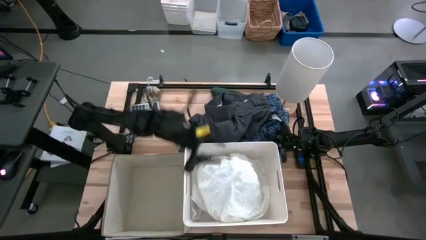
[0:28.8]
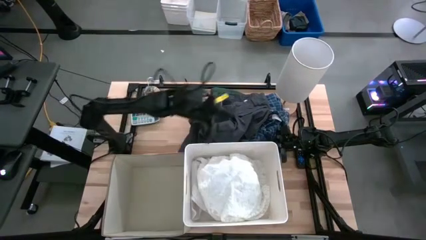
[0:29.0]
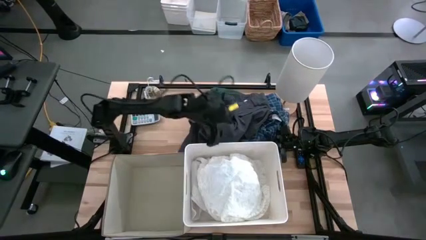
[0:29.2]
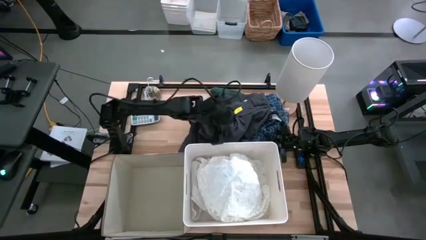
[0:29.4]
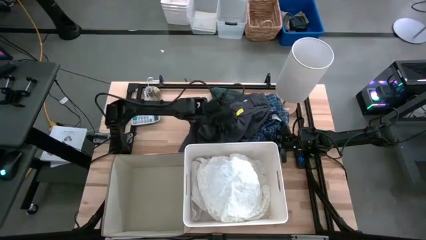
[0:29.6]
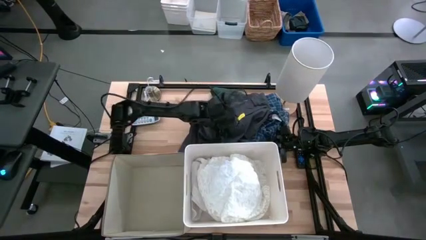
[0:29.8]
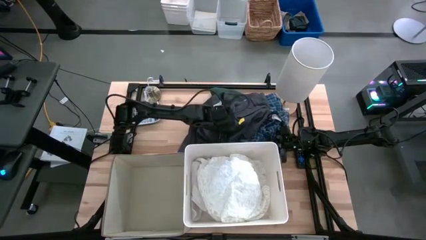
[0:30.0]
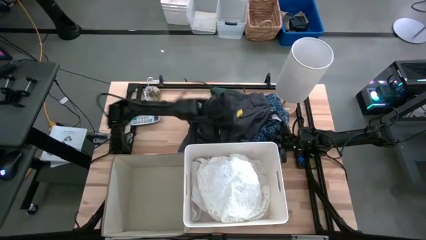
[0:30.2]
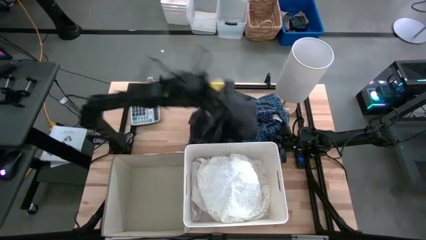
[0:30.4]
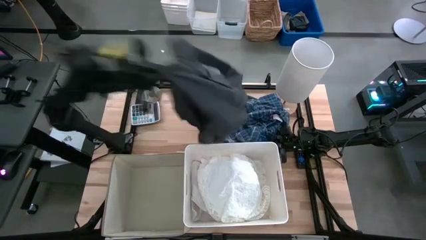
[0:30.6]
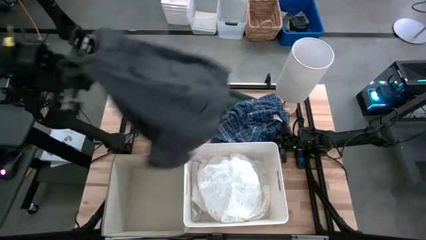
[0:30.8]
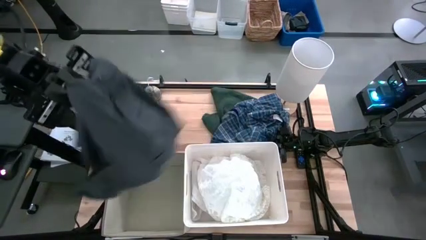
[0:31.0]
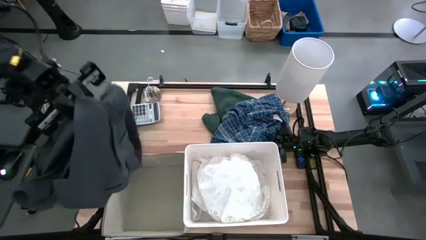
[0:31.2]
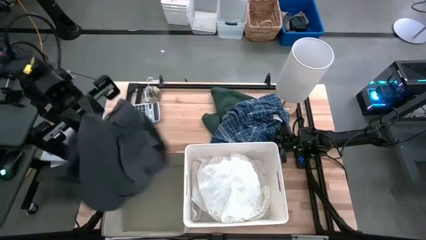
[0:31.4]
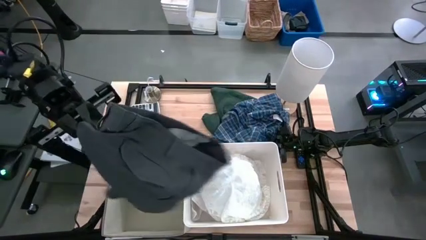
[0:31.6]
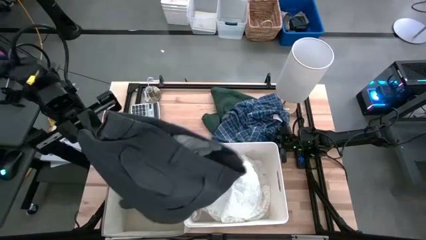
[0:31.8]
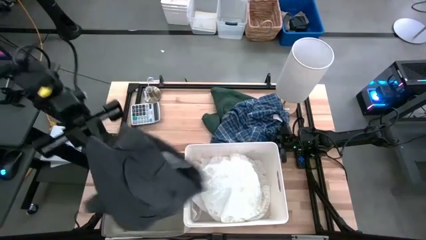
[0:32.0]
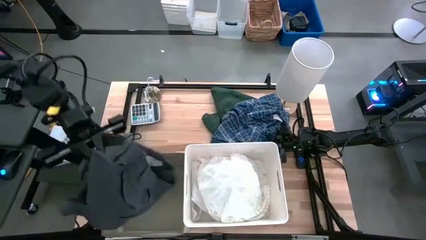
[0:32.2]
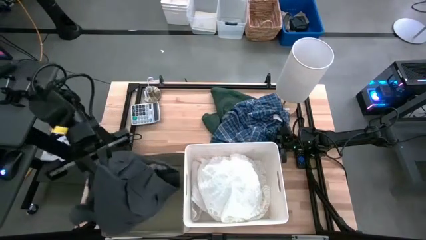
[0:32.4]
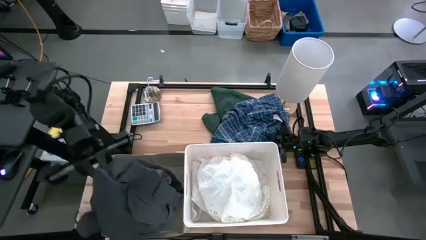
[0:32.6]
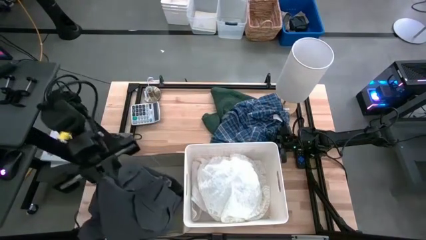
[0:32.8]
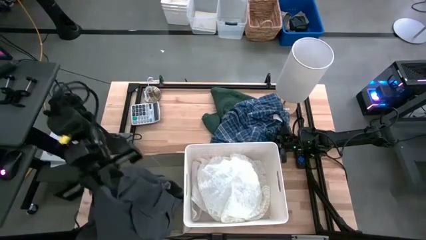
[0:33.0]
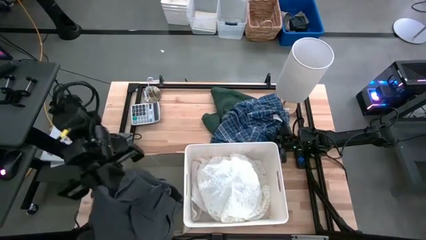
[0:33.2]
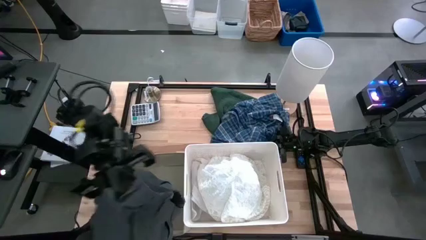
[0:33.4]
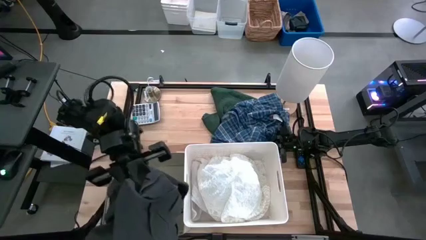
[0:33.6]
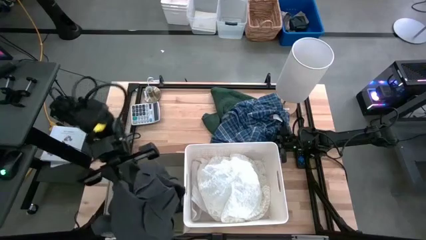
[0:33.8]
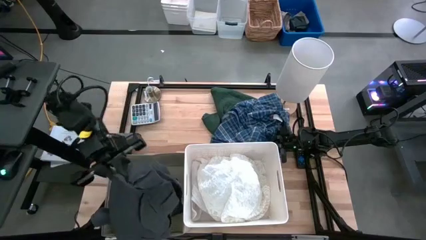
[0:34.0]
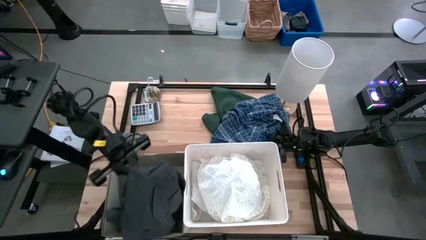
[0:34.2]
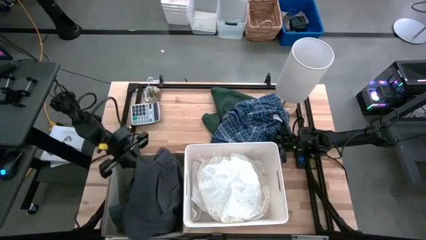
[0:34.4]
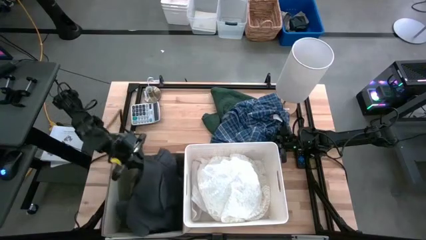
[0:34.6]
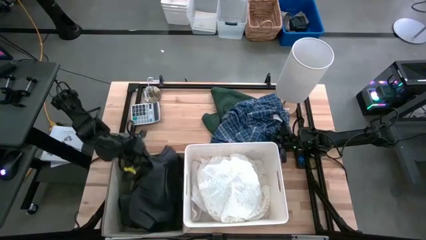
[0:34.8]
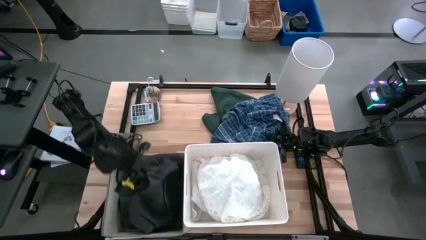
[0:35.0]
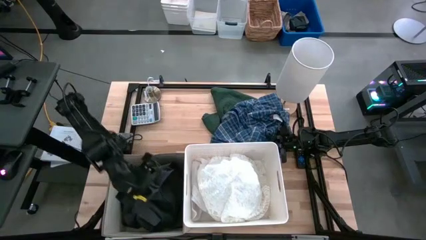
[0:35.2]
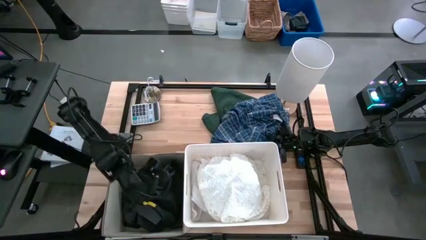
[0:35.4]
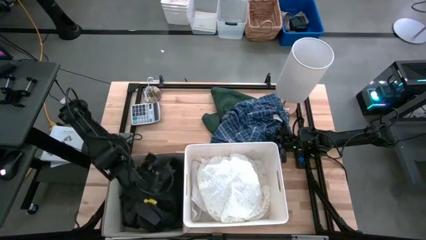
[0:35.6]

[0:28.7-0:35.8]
Task: Sort clothes
Put the black shorts into the beige laundry organizer

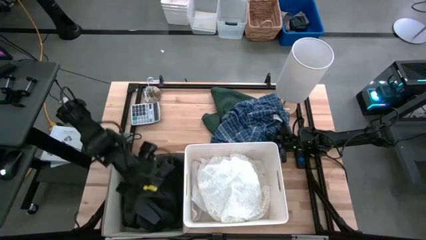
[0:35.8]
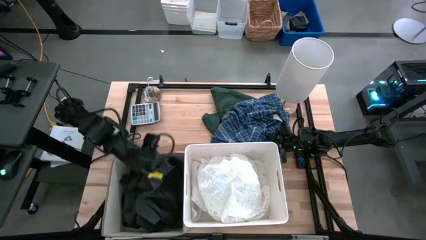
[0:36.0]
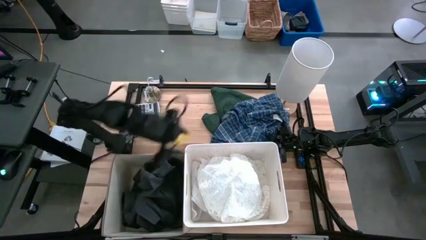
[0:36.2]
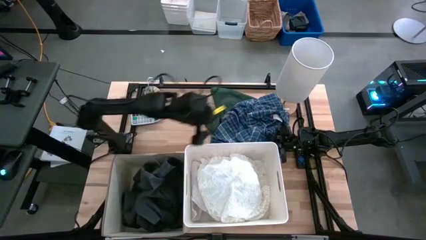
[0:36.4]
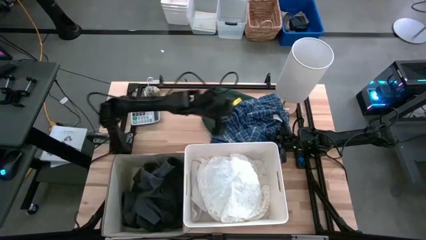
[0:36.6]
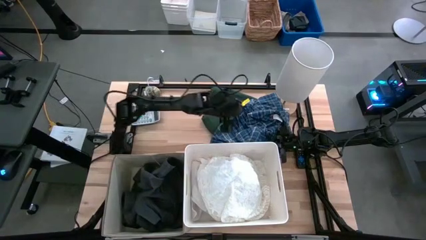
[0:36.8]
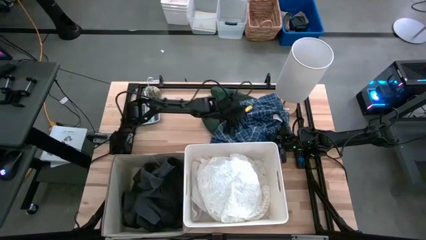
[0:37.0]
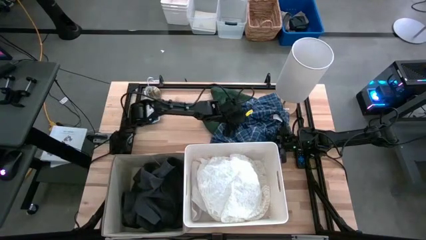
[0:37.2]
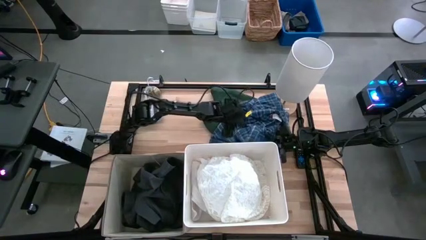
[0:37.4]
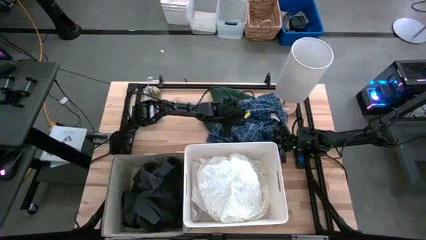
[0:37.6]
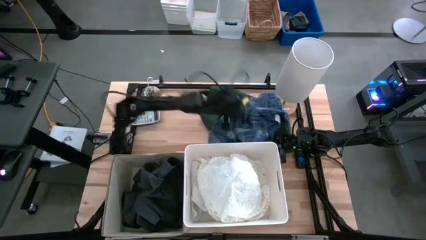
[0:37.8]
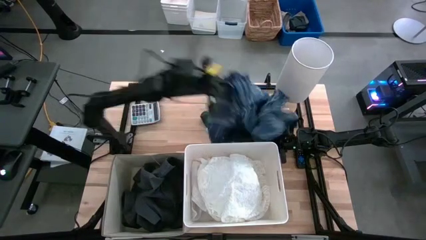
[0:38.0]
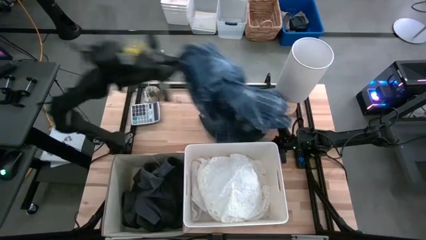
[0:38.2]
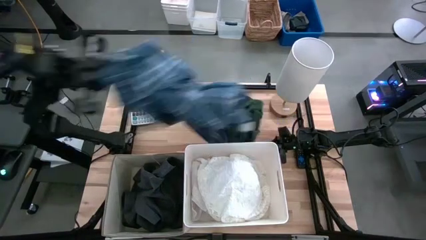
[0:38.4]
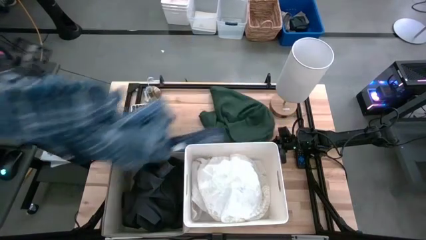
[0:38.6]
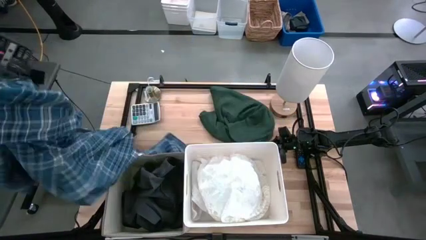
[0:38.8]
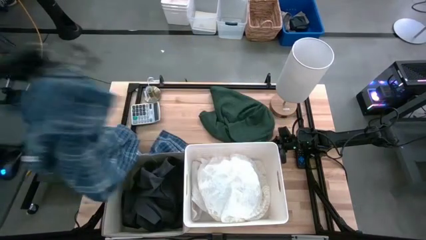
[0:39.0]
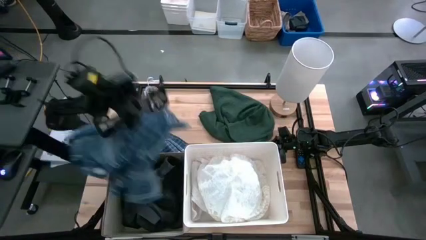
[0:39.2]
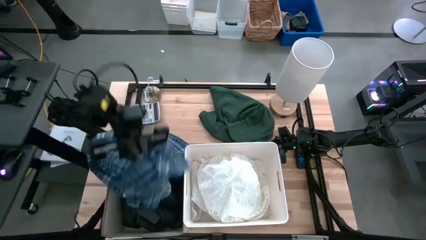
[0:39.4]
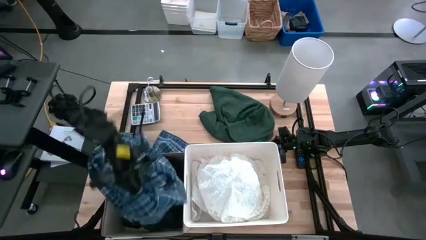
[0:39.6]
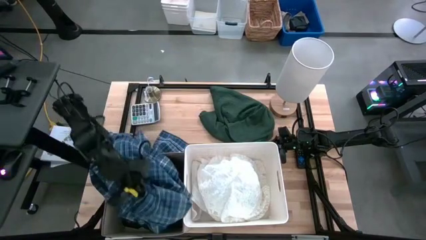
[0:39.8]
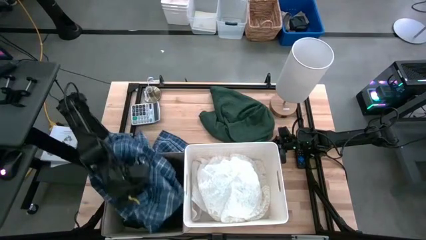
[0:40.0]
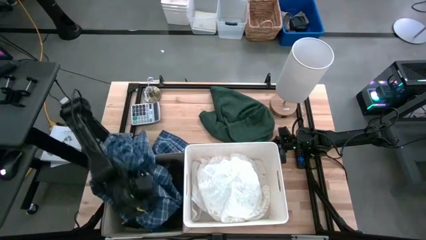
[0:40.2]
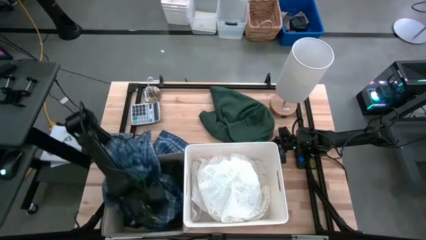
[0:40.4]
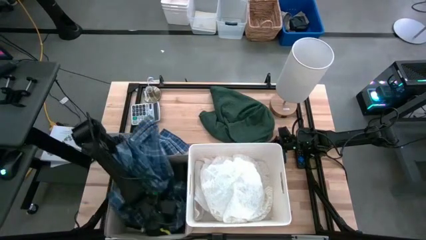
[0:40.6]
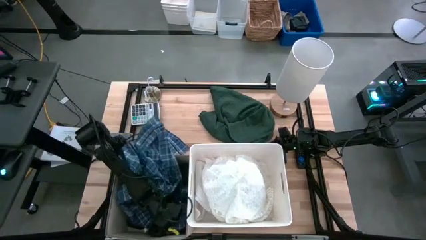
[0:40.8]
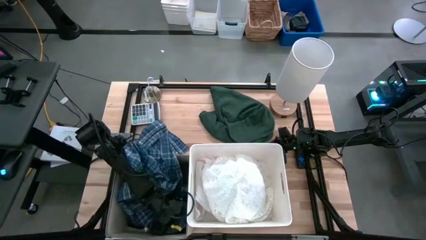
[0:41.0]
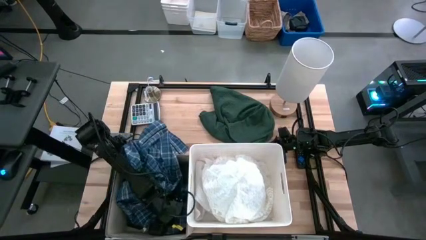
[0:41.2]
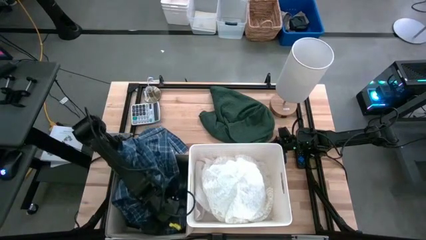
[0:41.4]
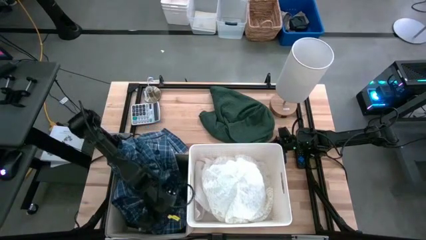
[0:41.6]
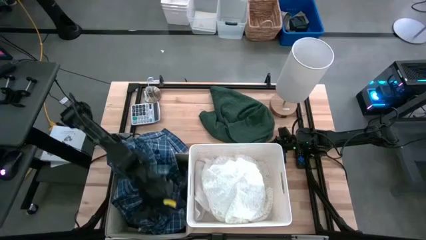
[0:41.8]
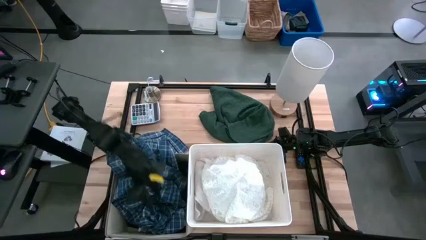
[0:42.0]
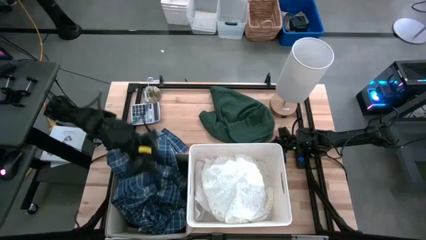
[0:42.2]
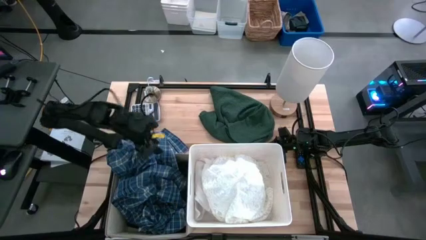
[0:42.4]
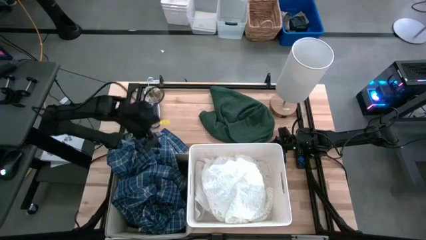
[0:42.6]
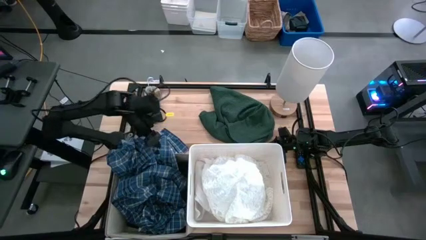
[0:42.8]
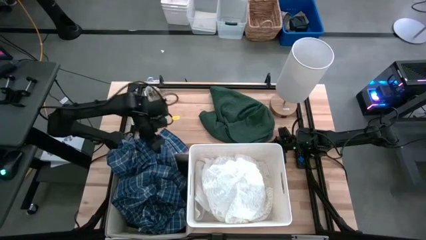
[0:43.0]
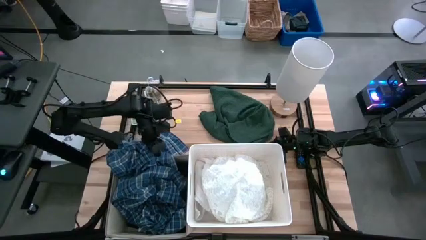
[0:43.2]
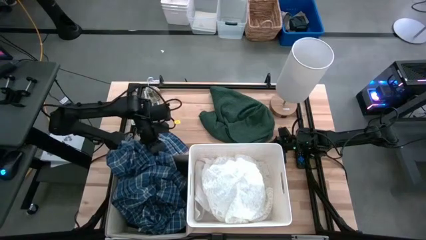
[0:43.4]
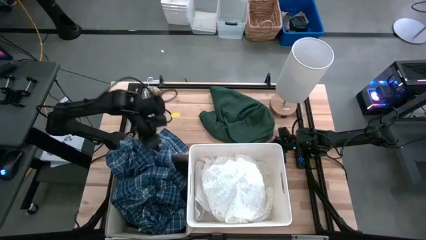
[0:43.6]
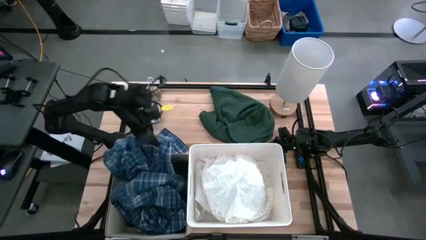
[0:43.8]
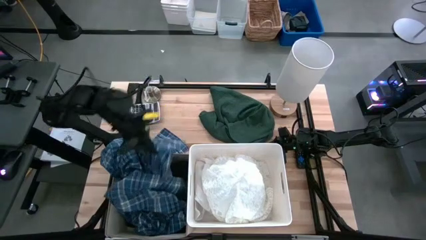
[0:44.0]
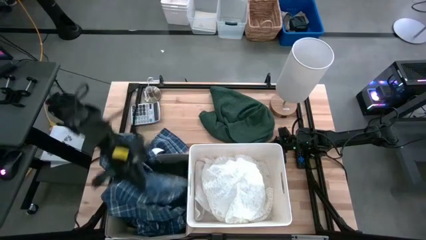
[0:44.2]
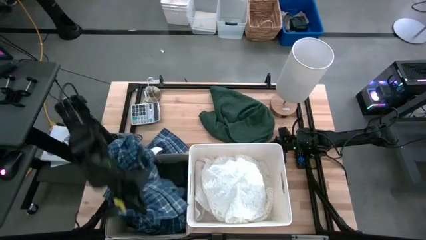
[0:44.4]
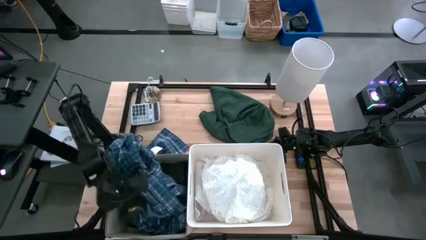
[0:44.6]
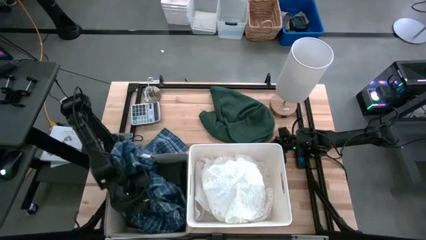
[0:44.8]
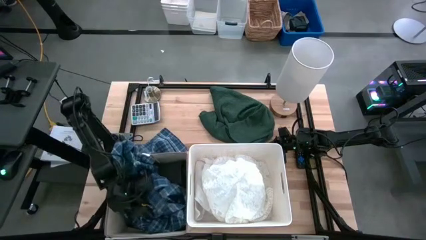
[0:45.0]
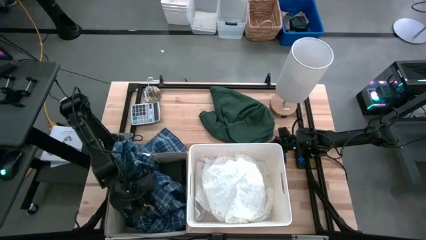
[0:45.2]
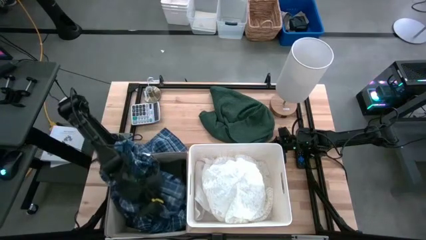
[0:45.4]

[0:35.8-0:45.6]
Put the blue checkered polo into the beige laundry organizer
